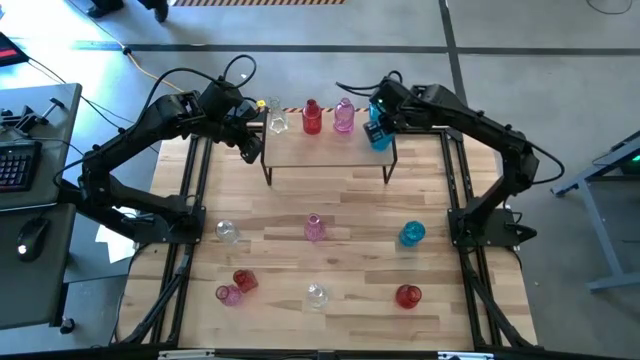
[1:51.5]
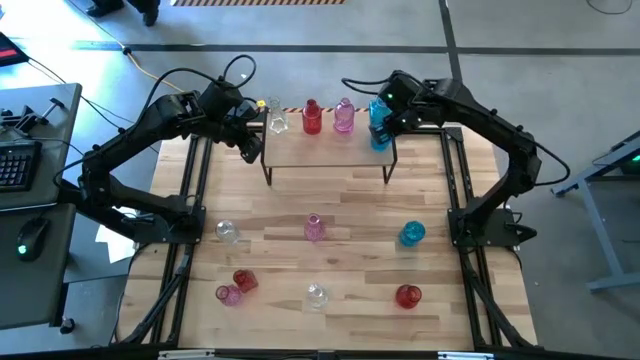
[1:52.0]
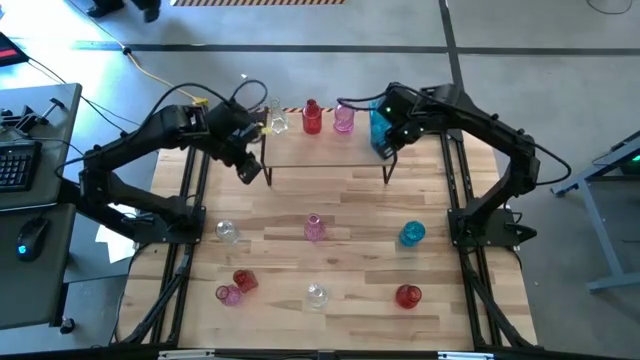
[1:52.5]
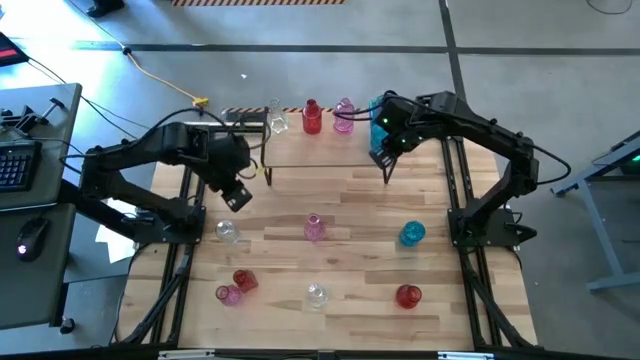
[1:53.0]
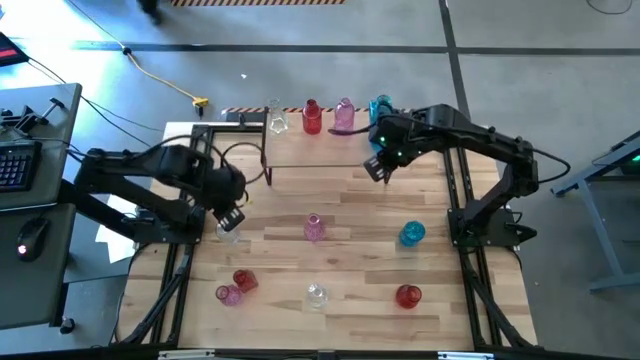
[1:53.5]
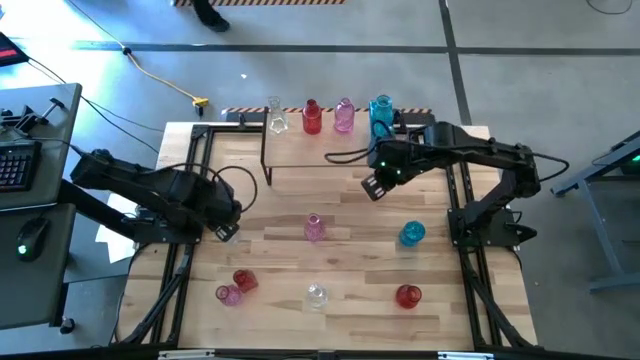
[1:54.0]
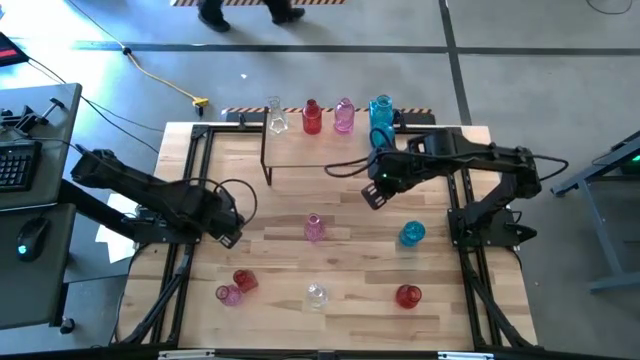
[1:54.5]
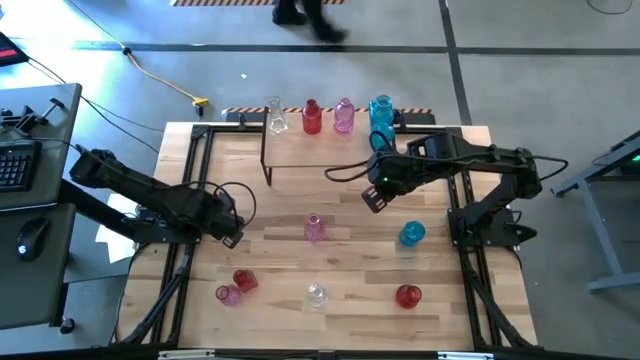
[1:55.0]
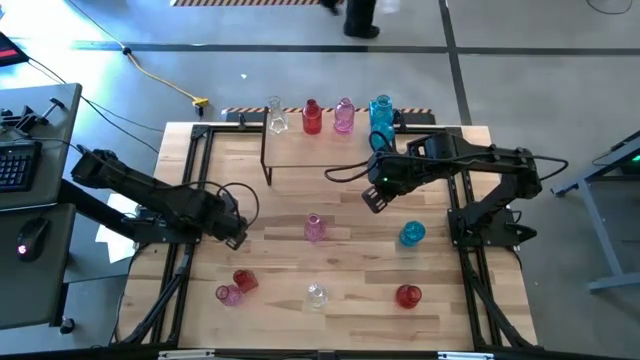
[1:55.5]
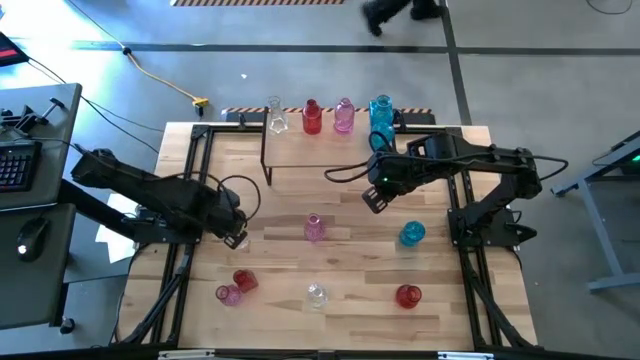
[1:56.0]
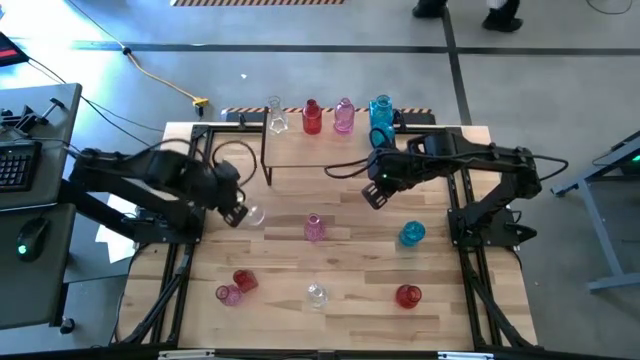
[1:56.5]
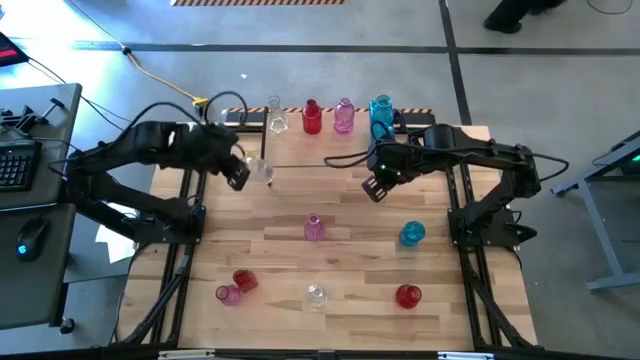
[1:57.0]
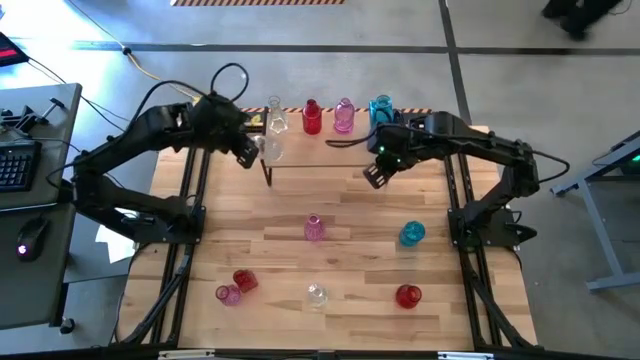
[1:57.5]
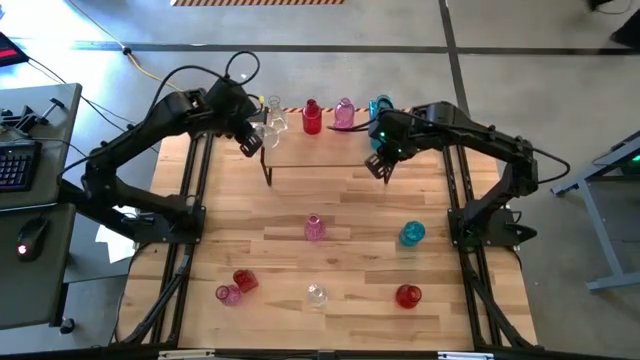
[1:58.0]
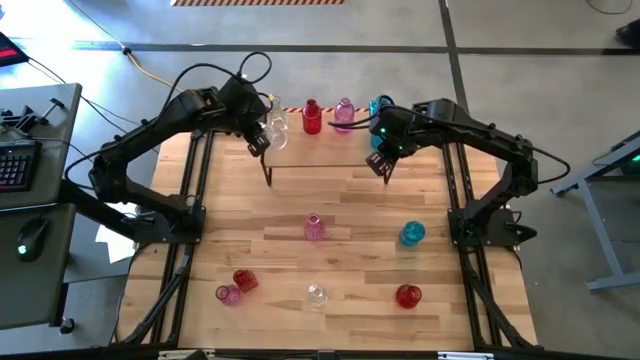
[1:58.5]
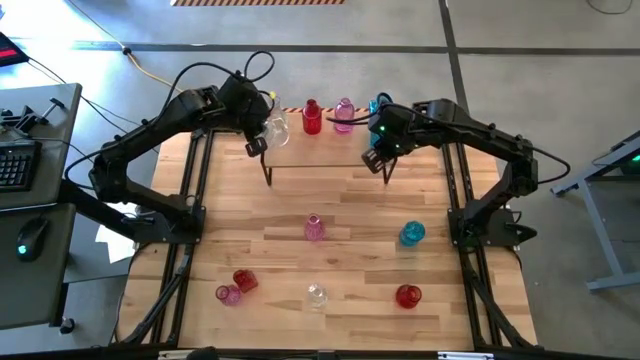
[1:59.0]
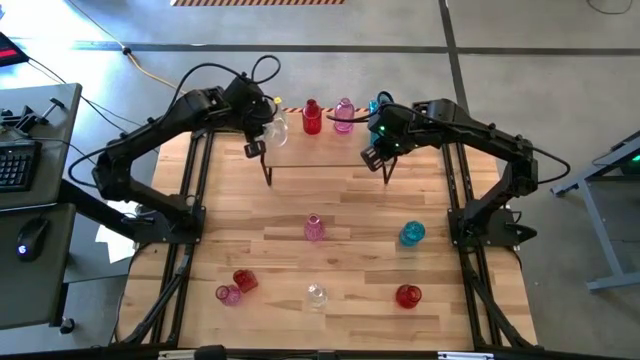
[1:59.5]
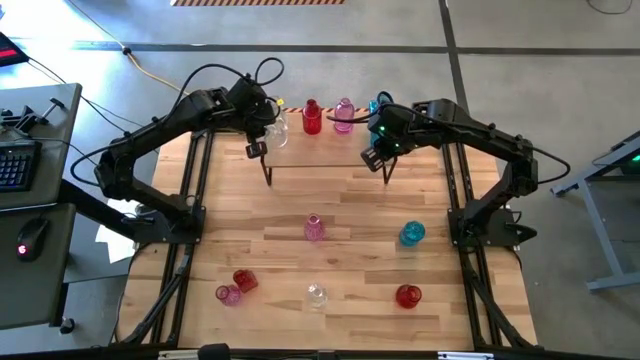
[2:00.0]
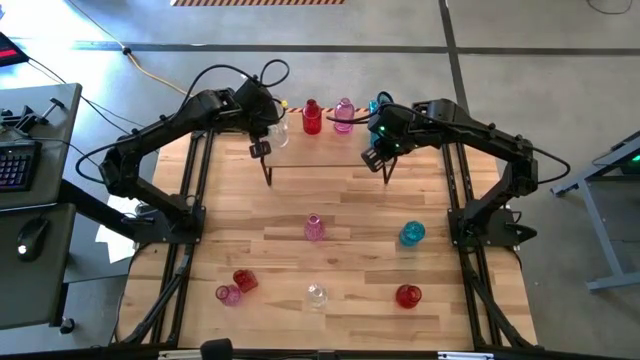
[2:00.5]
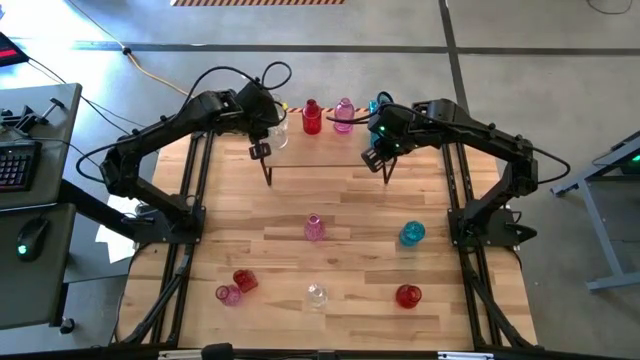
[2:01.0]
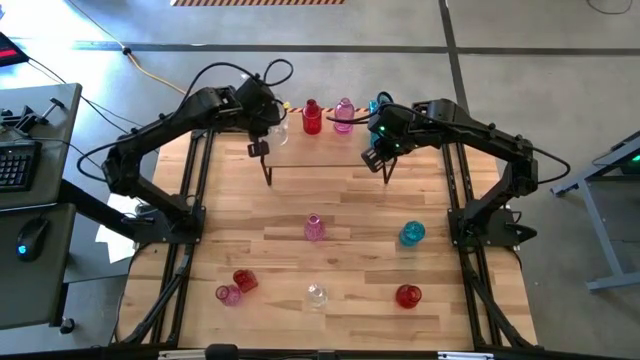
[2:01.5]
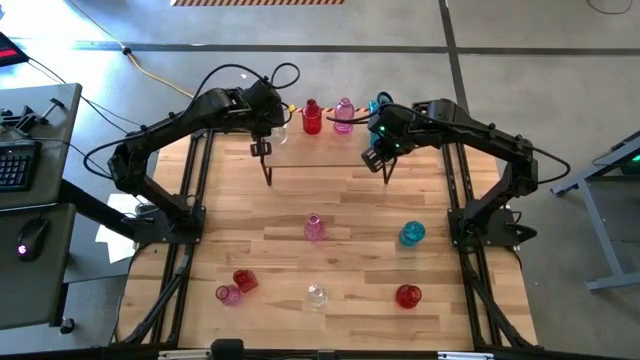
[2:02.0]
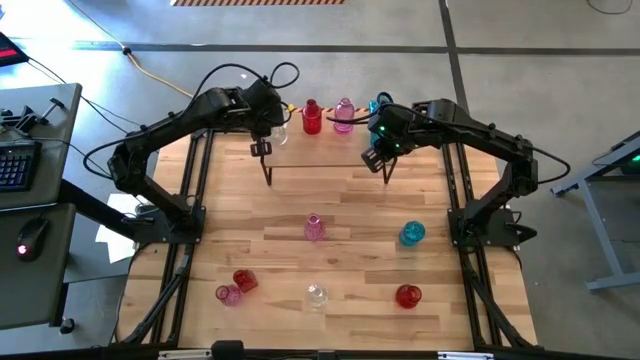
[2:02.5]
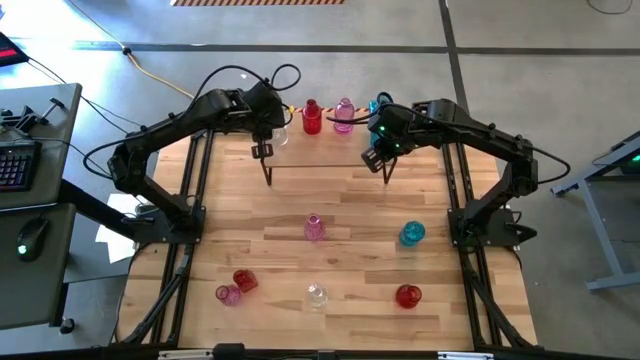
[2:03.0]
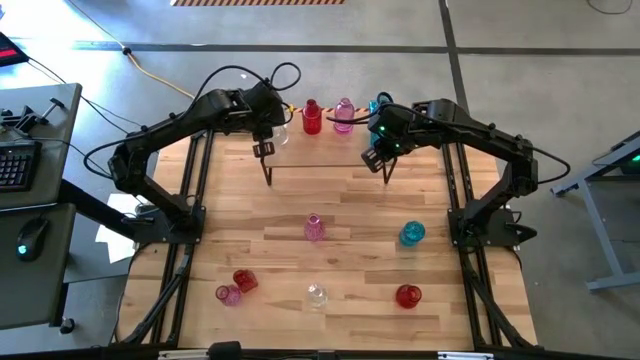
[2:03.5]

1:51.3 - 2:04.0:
Task: sort vases onto shelf
Put the left transparent vase on the shelf aligned with the other transparent vase
